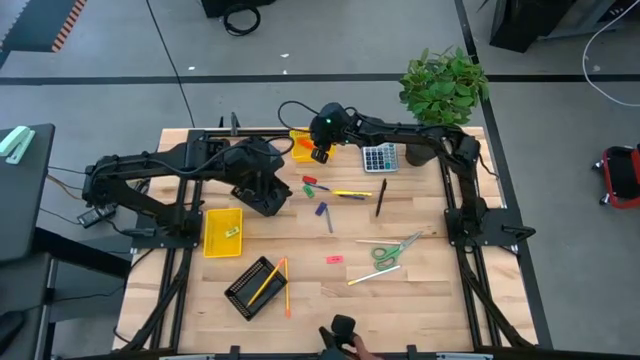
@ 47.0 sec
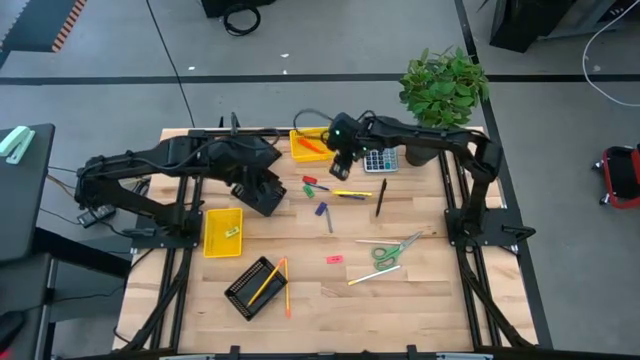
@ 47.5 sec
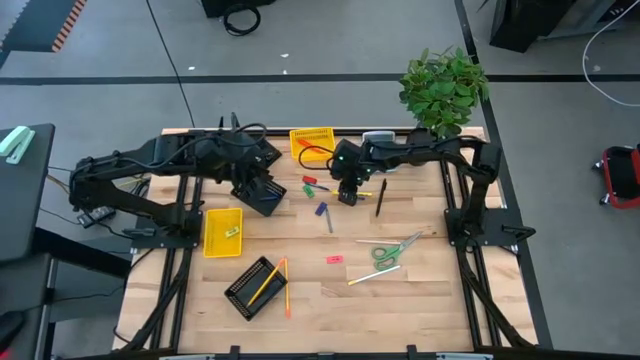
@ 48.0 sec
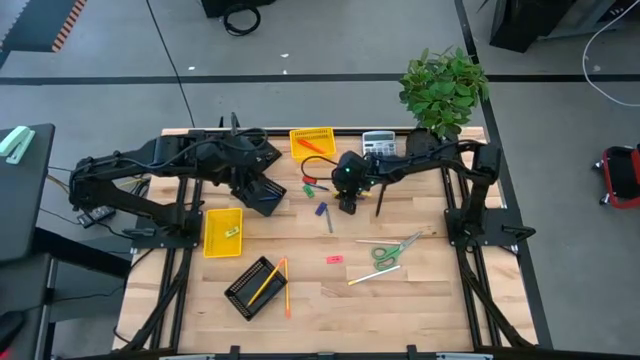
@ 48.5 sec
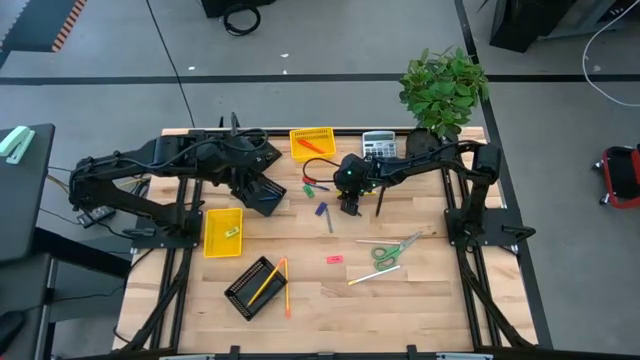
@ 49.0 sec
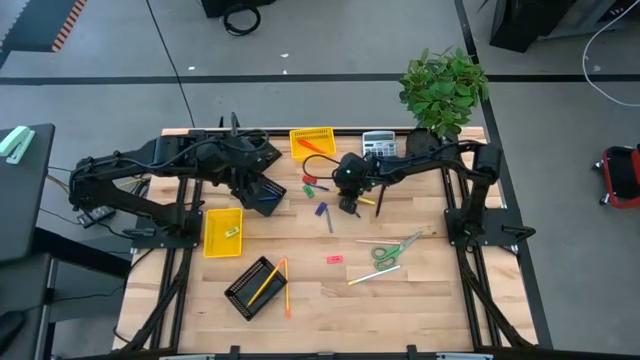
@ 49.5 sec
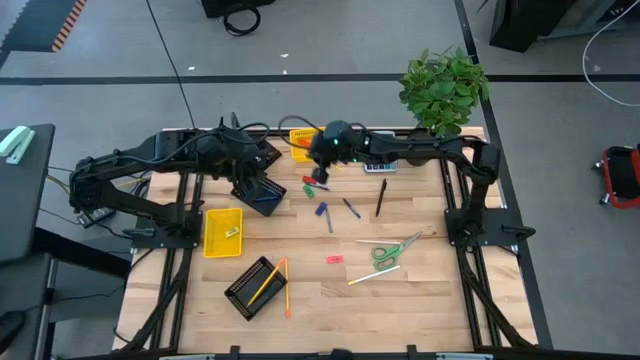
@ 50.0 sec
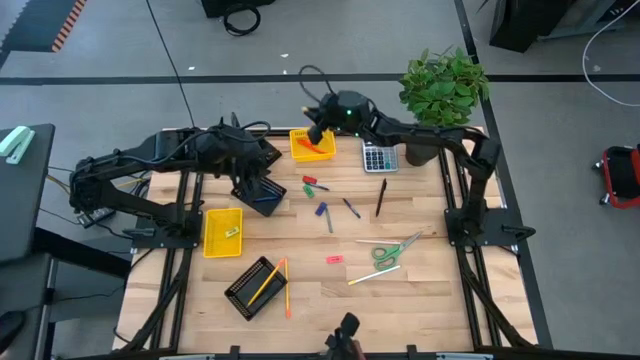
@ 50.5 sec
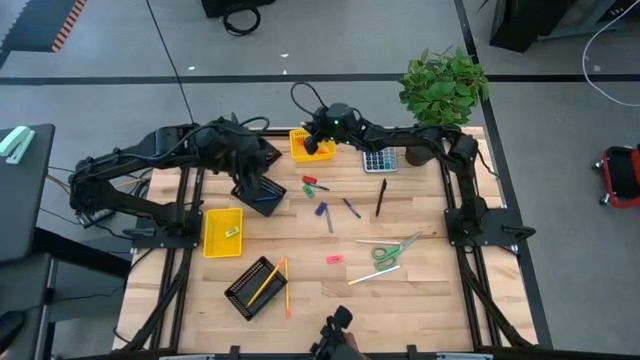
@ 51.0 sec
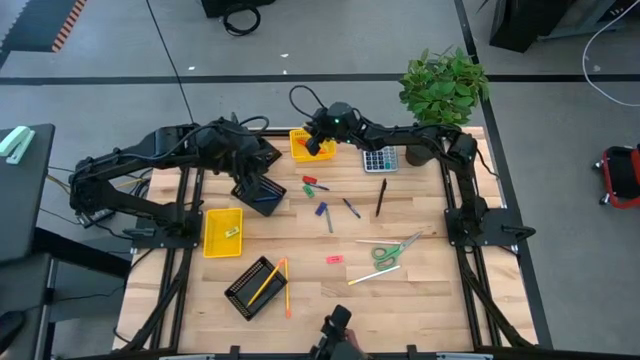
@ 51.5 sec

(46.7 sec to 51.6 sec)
Task: Sort crayons/erasers/pens/pencils in bins
Put the yellow pen into the top yellow basket

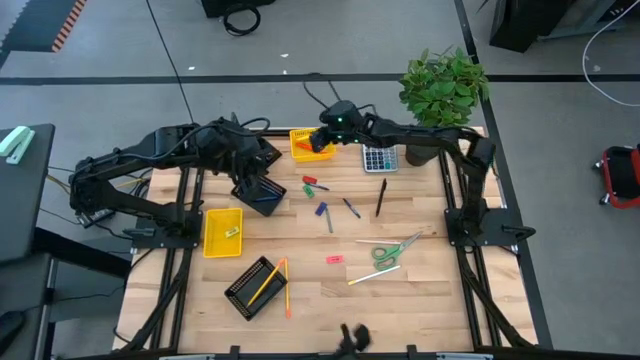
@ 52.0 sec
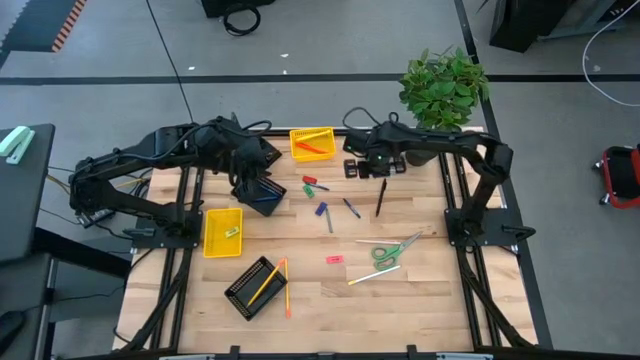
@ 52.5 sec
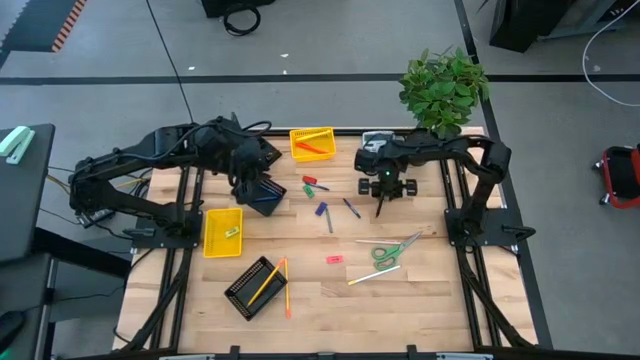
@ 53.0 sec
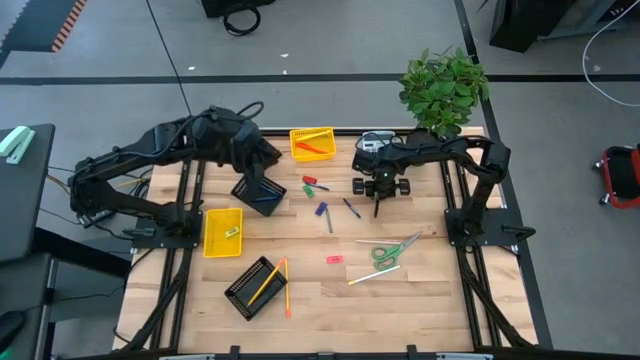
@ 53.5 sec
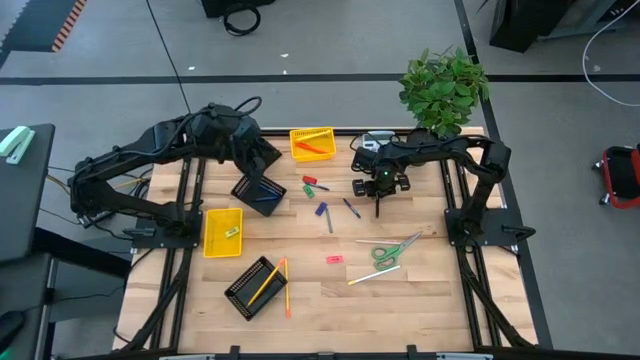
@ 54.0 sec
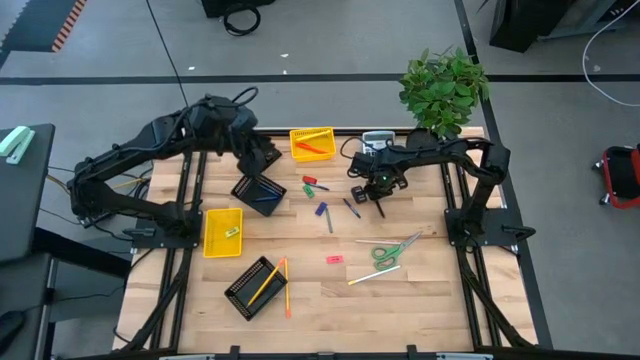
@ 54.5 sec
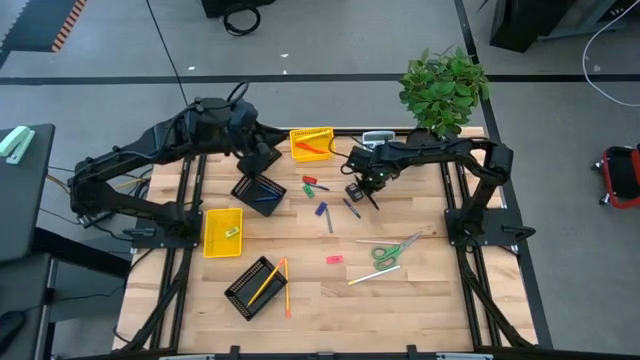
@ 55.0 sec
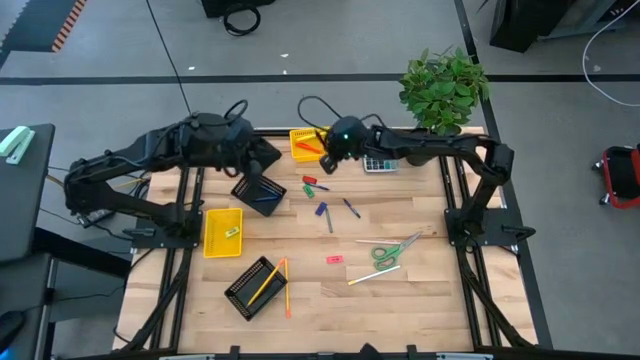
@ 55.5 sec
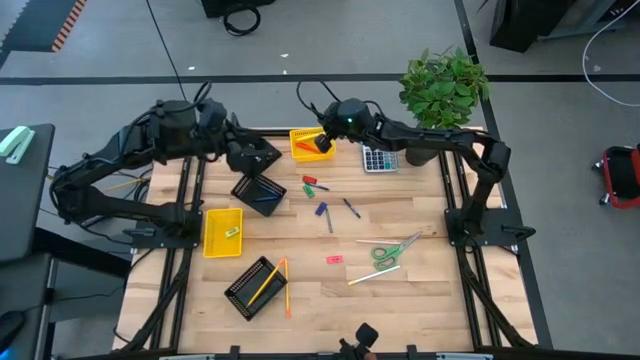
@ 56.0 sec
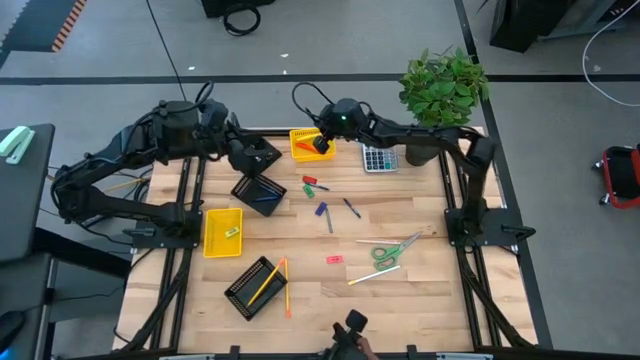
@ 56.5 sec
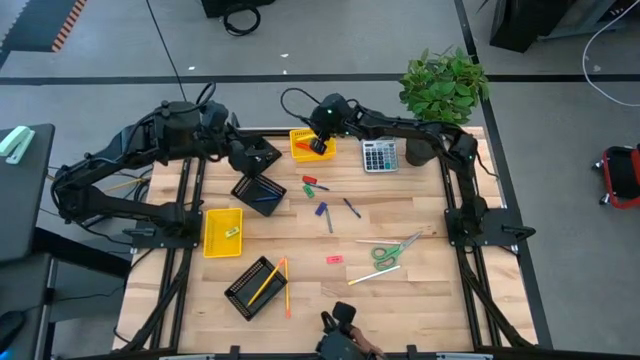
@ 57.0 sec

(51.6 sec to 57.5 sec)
Put the black pen into the top yellow basket

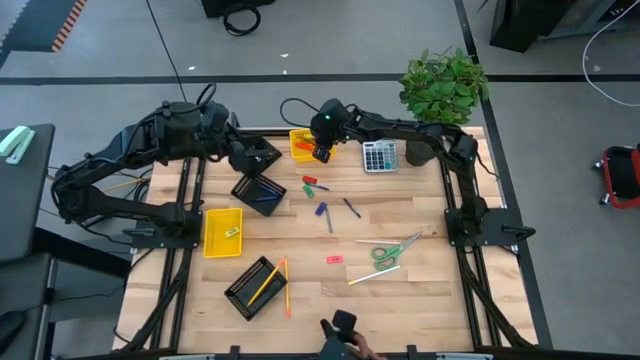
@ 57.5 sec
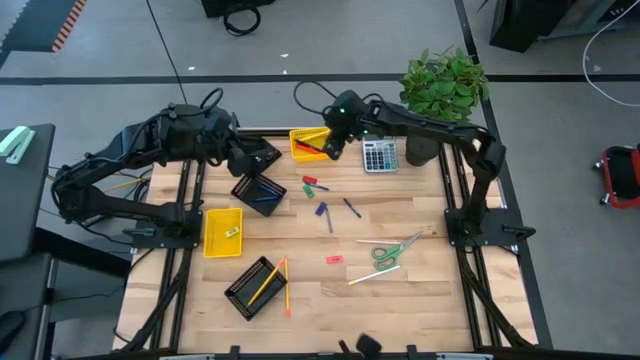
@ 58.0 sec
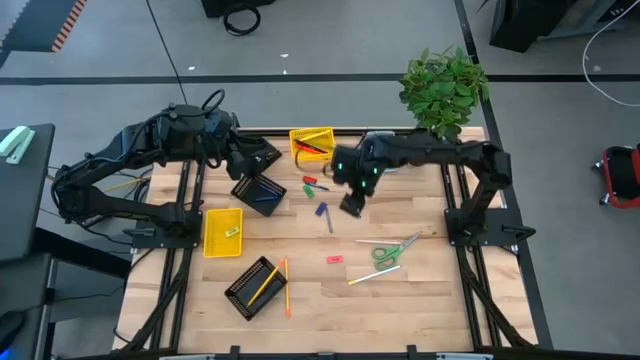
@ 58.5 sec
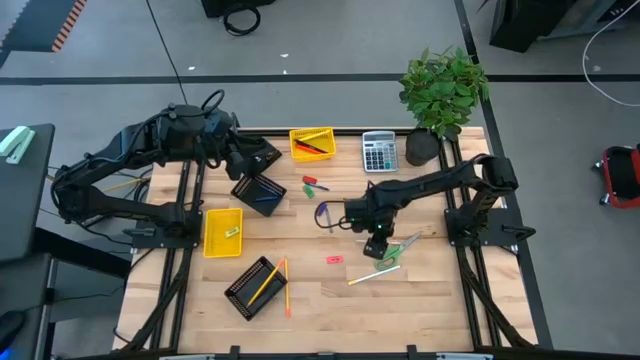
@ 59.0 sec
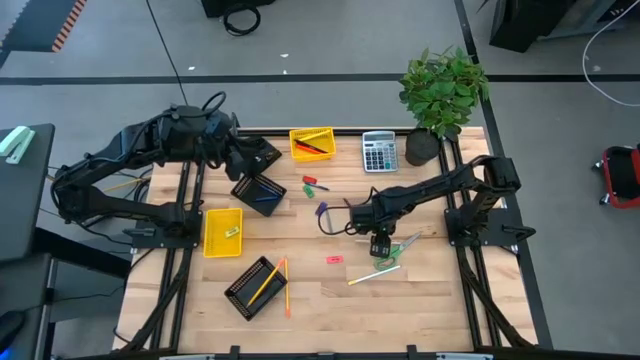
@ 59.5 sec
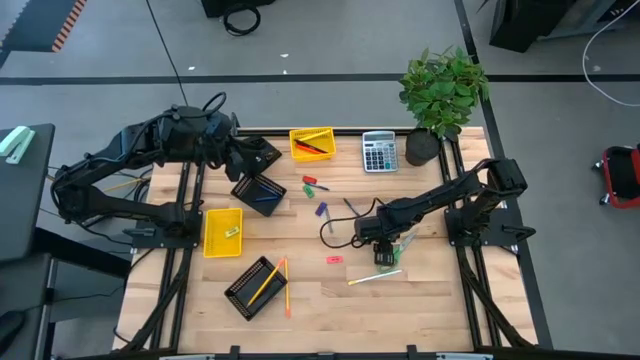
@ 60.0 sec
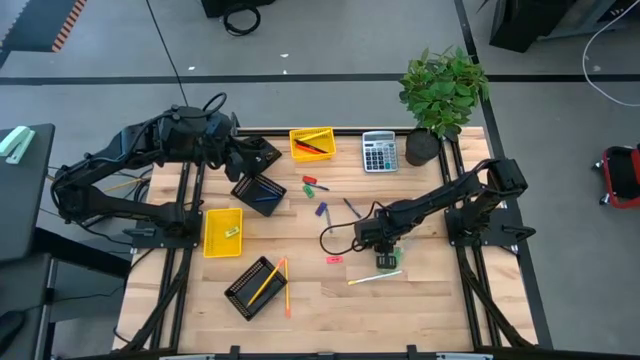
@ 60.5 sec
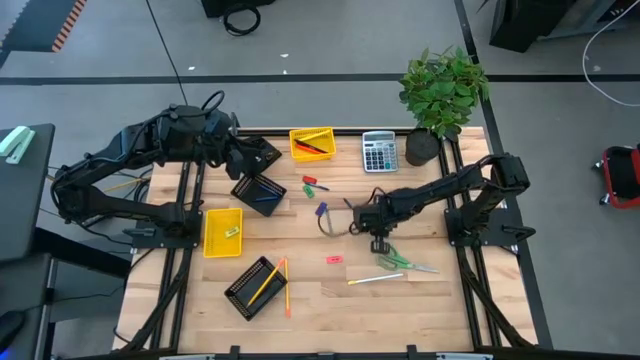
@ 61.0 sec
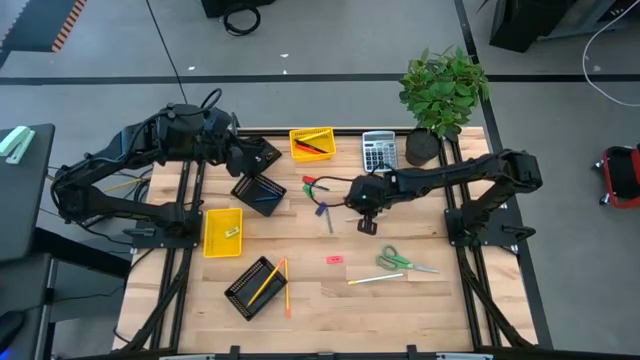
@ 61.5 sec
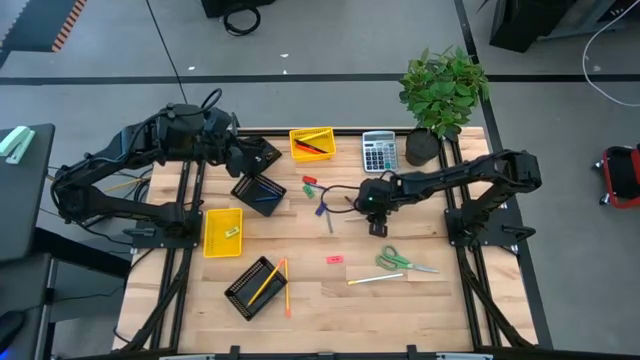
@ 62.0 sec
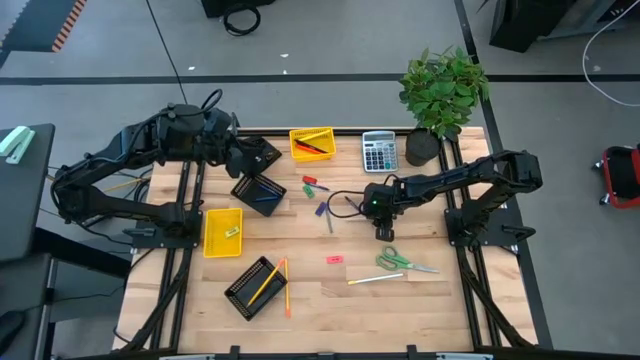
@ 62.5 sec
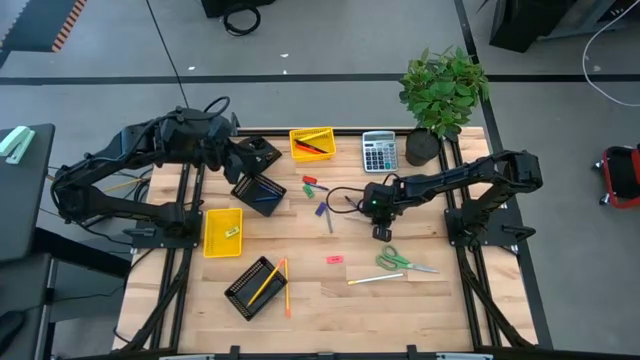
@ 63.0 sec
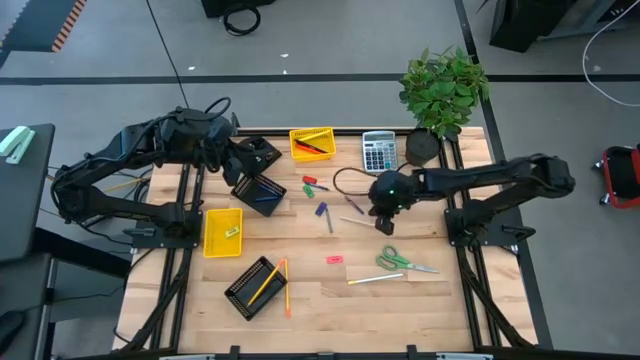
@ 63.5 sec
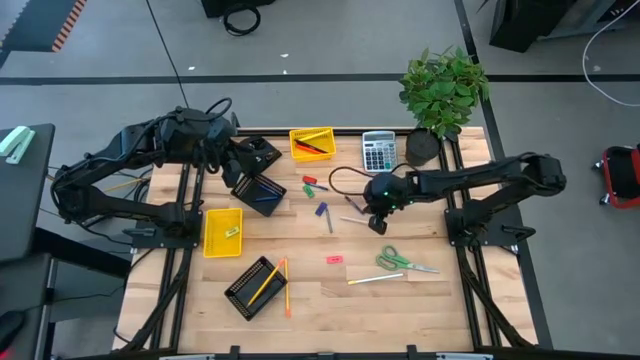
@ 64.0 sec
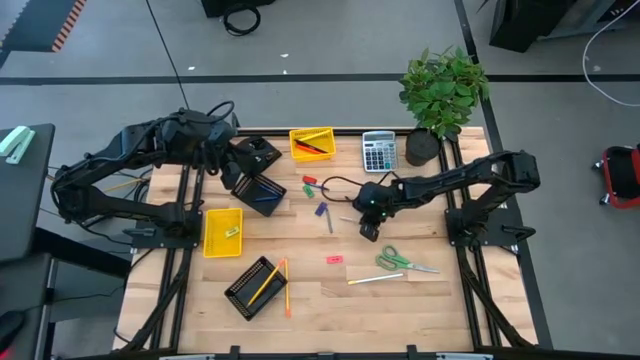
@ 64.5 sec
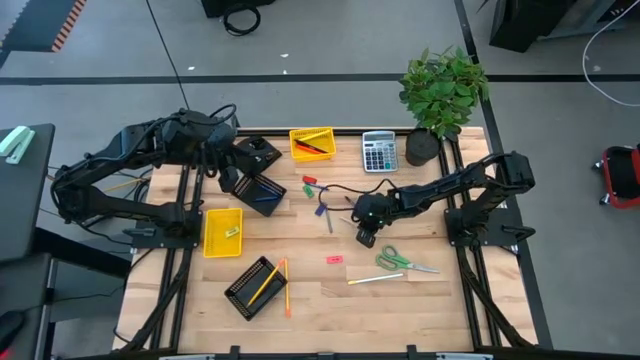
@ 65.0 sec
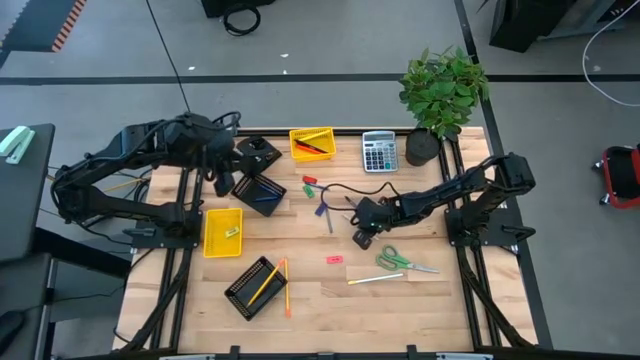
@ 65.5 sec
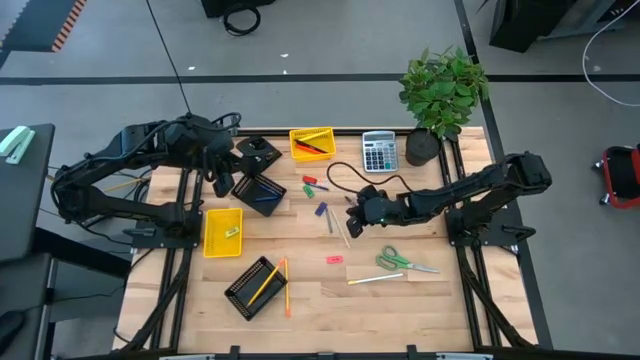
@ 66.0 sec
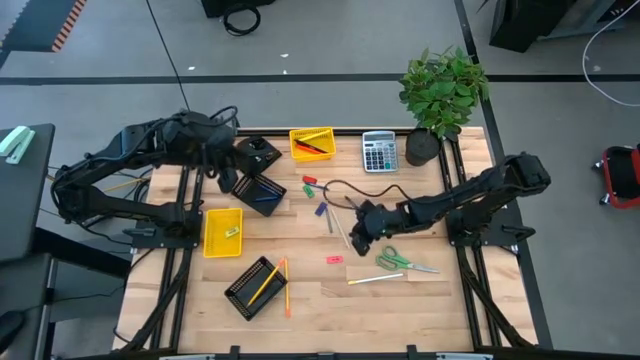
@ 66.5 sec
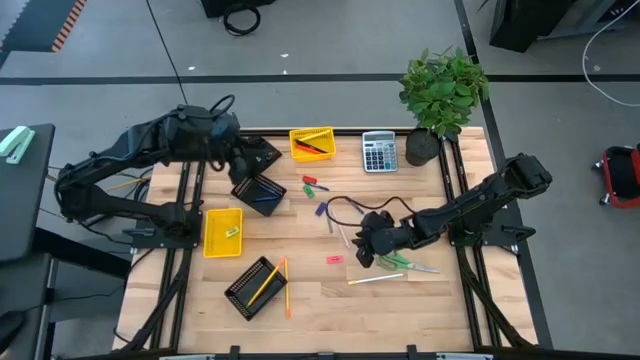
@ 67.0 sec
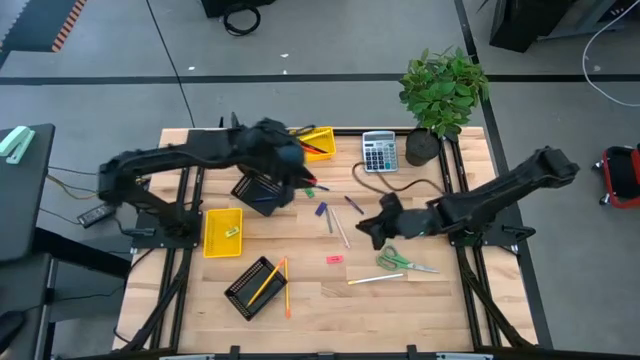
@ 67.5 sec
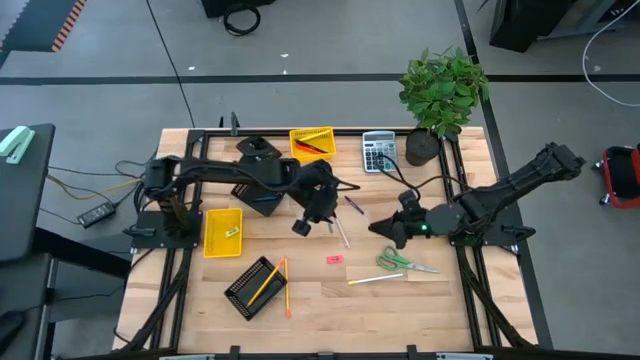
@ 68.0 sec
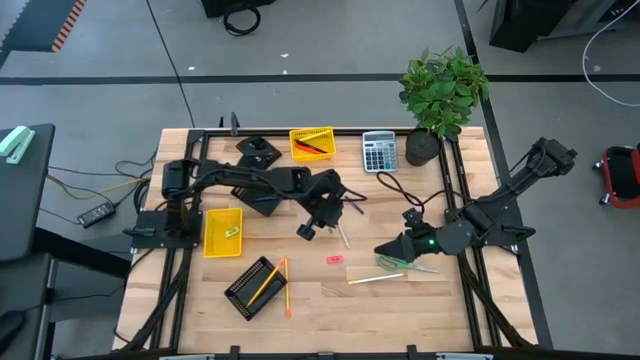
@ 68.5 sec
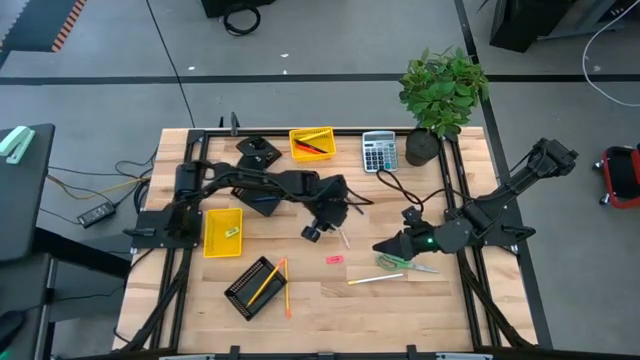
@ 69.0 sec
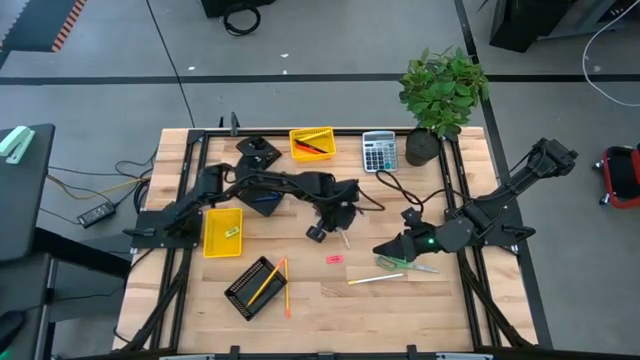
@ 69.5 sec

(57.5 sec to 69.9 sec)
Put the light pink pen into the top yellow basket

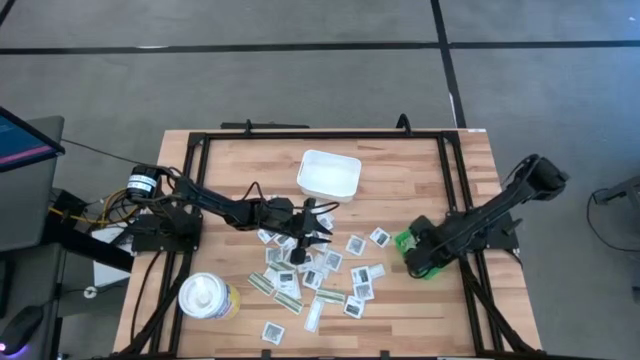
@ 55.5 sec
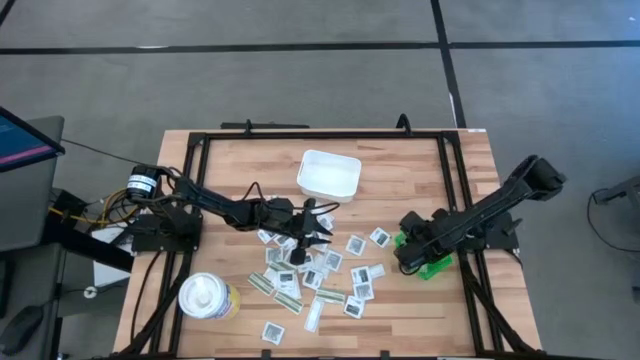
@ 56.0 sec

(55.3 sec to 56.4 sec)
Task: Pick & Place First Aid Supplies
Adjust the bandage pack in the green bin
